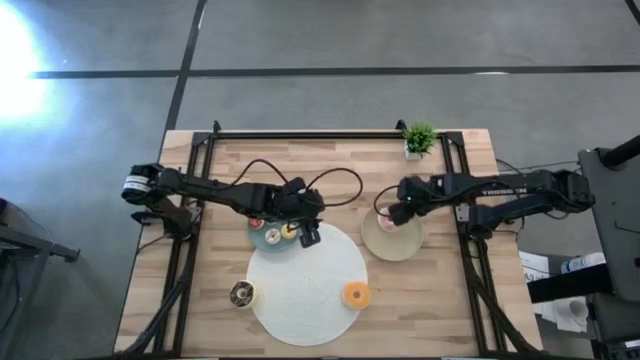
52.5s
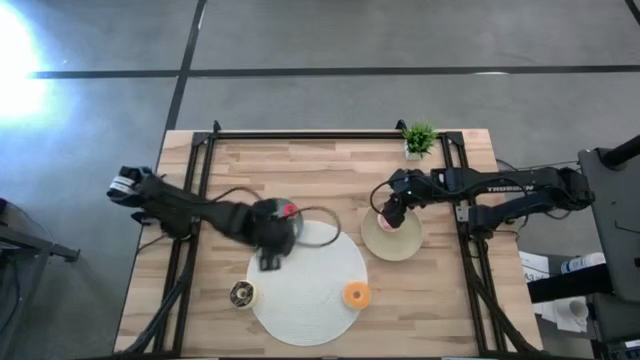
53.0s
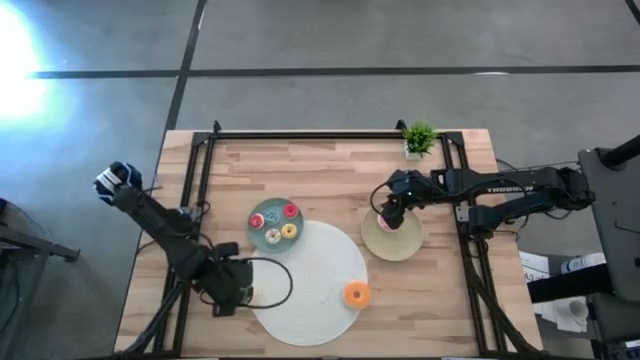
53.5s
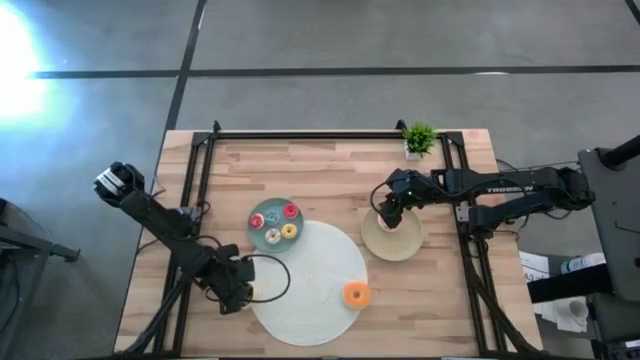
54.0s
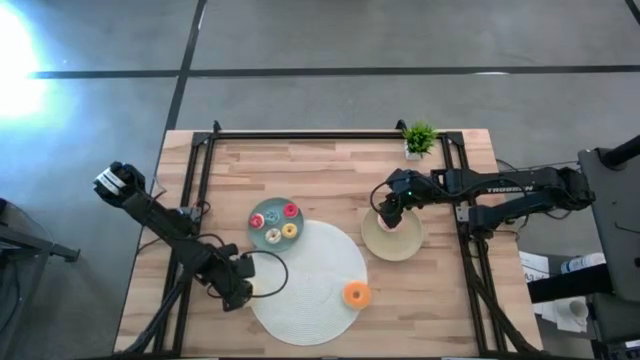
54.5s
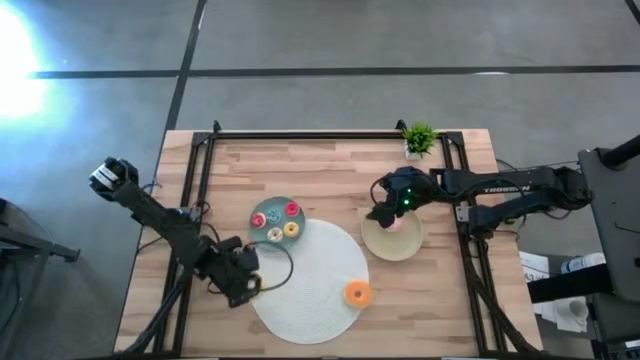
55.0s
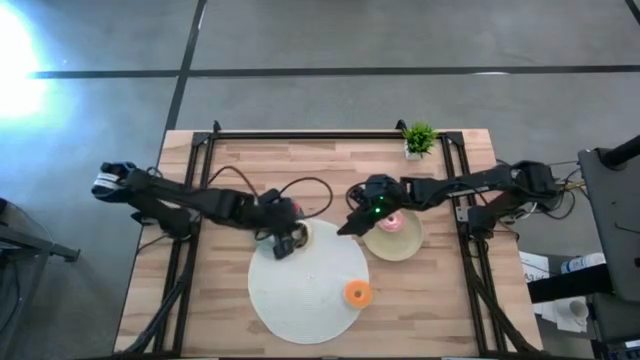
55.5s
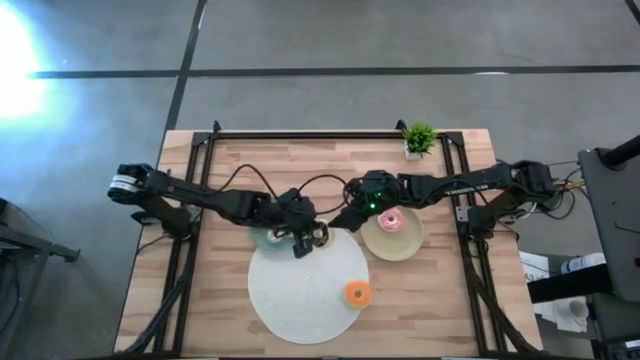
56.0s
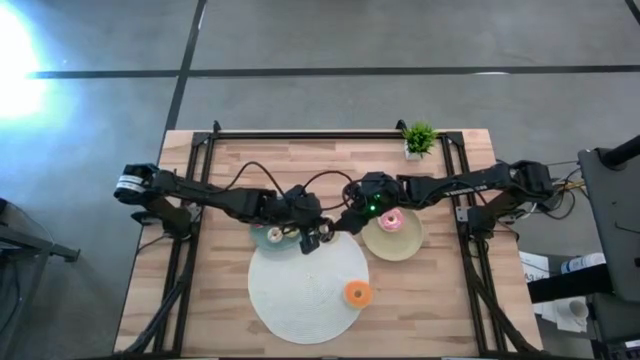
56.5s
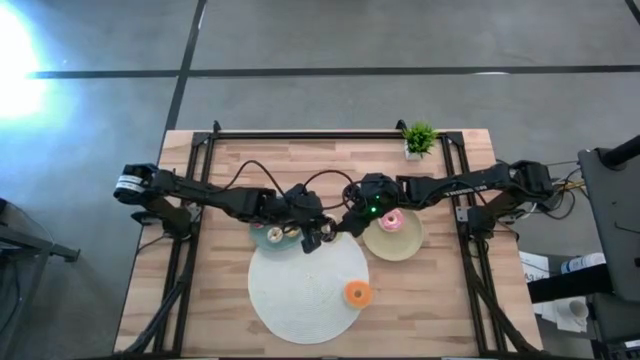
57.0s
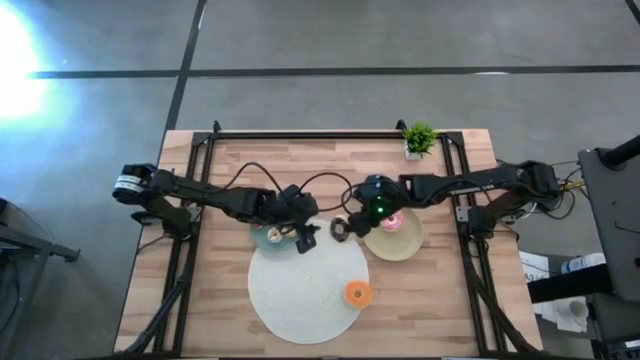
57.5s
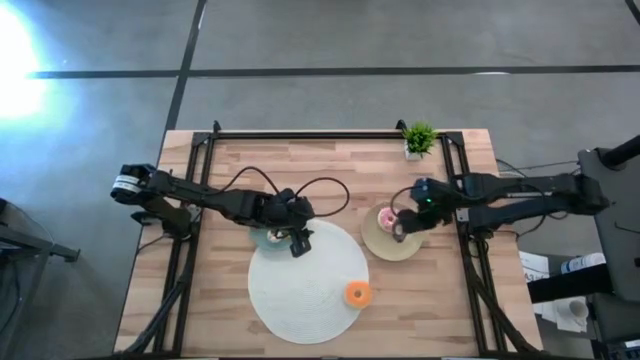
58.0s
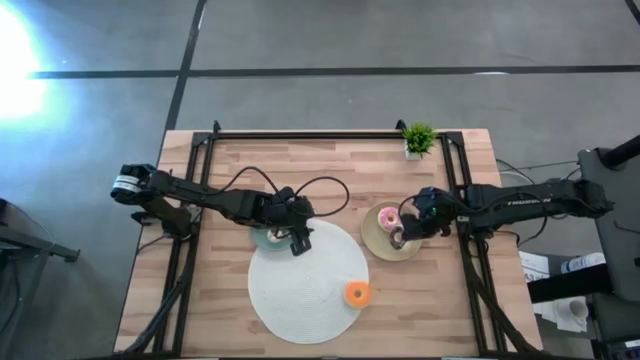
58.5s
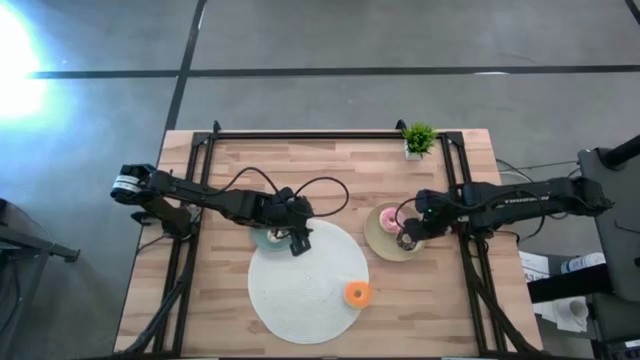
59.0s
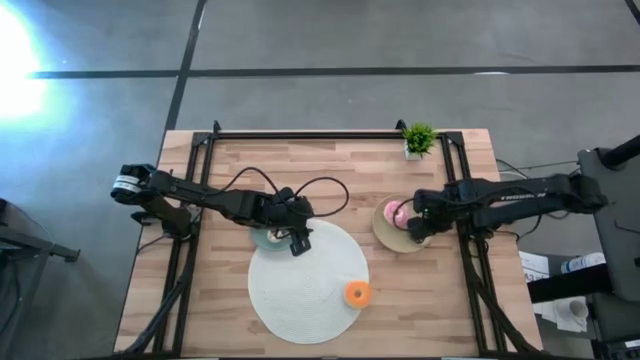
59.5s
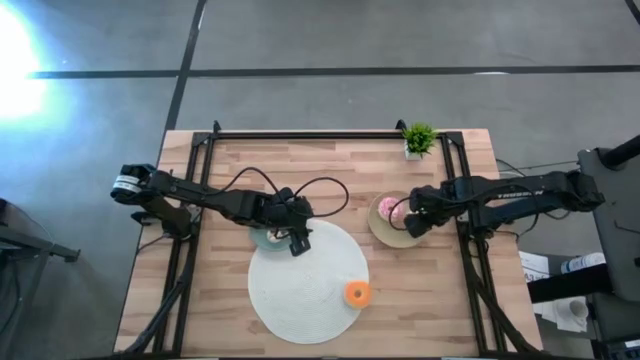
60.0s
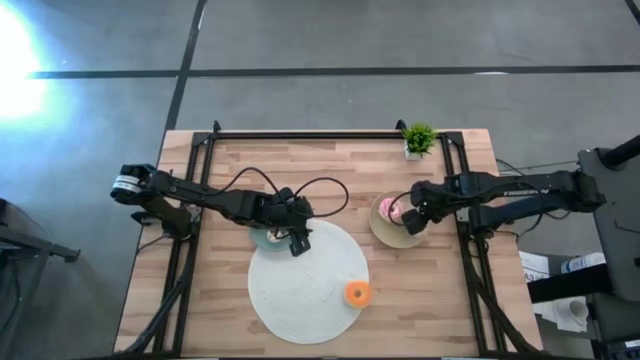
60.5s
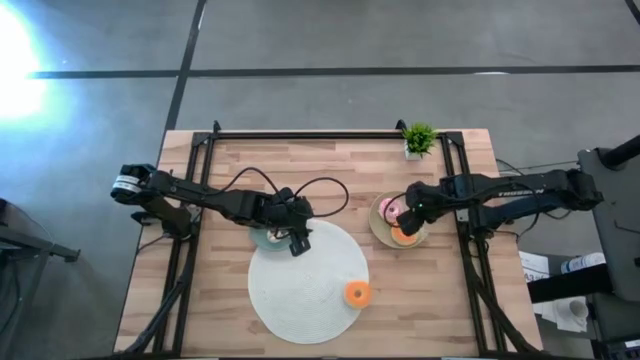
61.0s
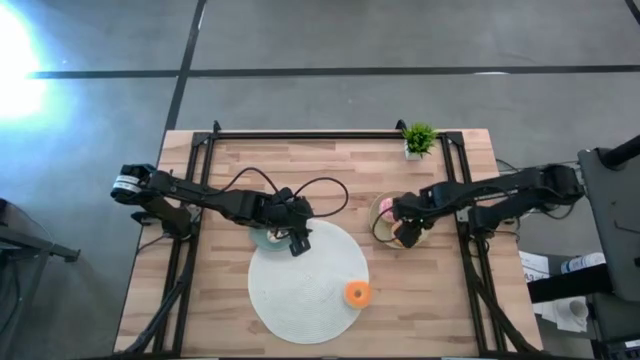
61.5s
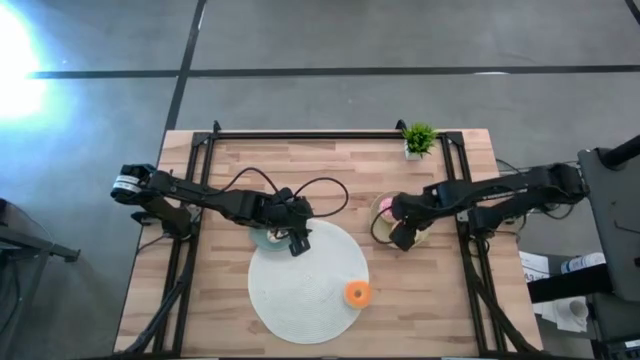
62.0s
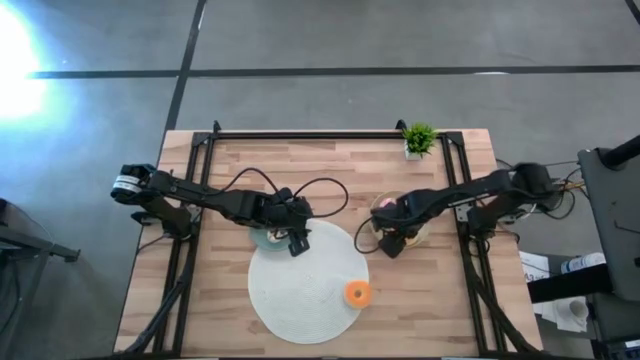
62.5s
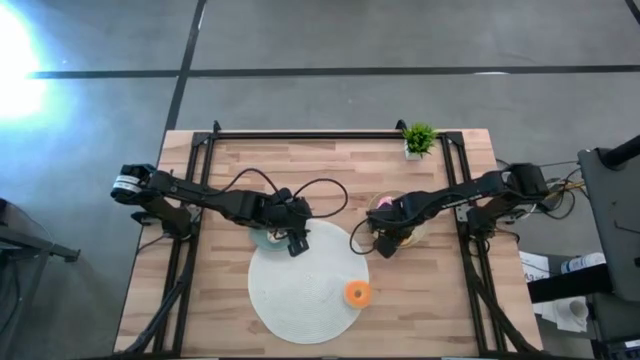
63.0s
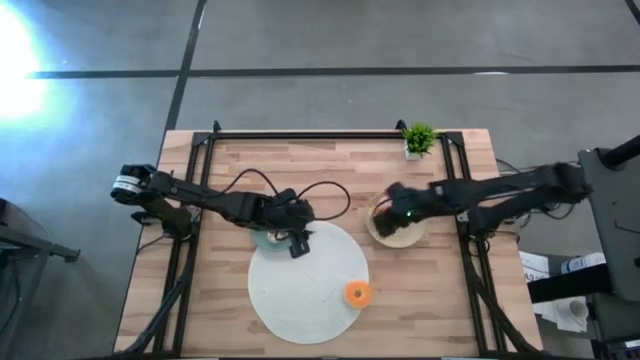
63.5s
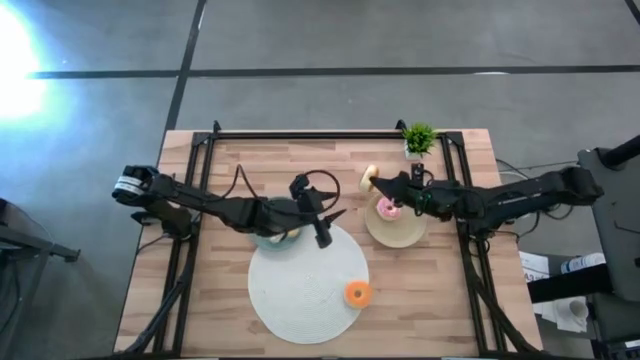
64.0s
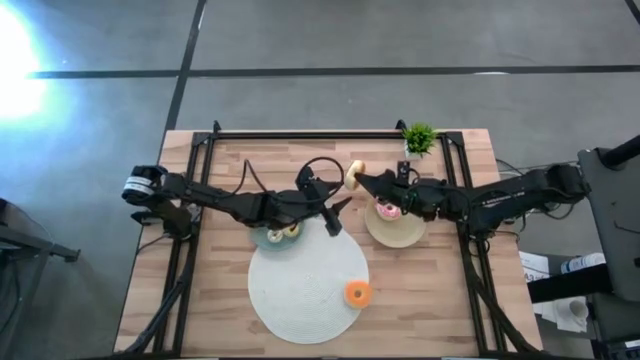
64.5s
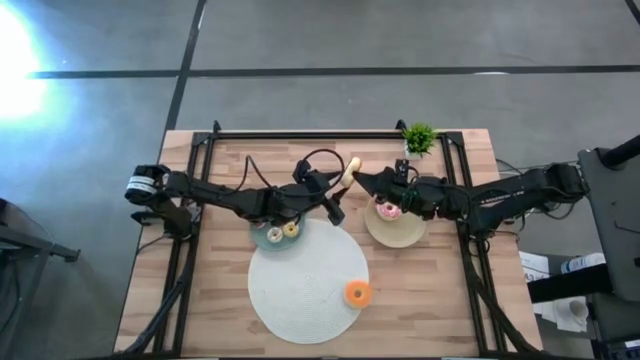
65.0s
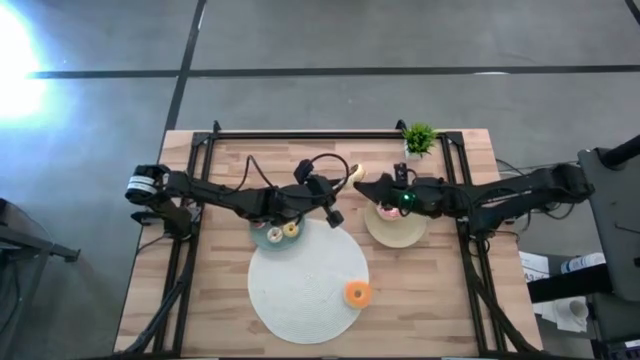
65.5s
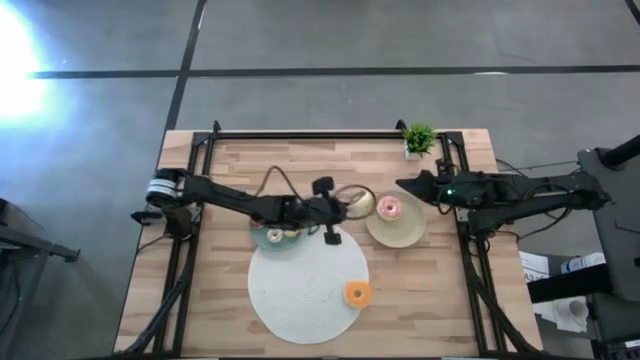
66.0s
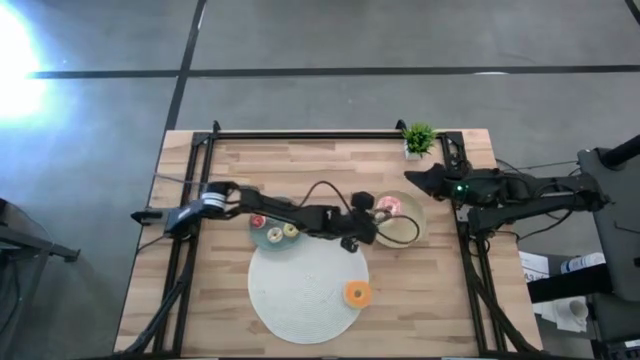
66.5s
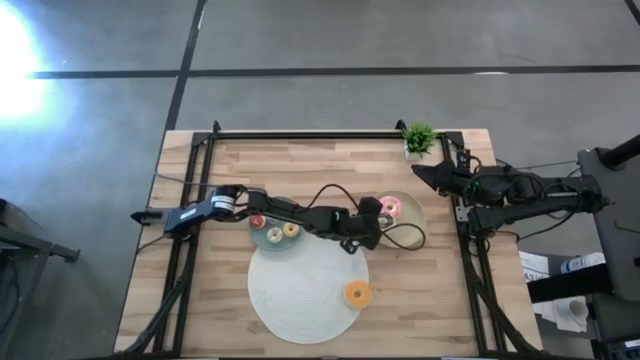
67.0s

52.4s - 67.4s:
Task: Pick & Place donuts
Put the big black donut on the brown plate

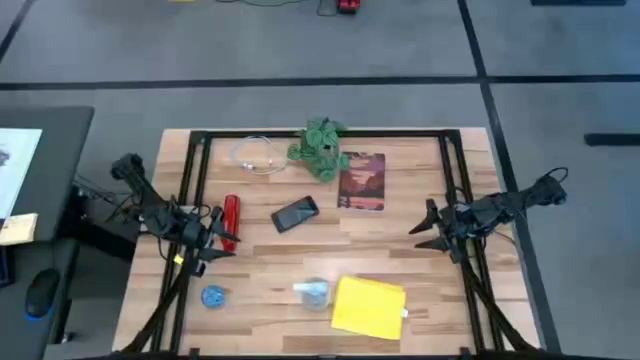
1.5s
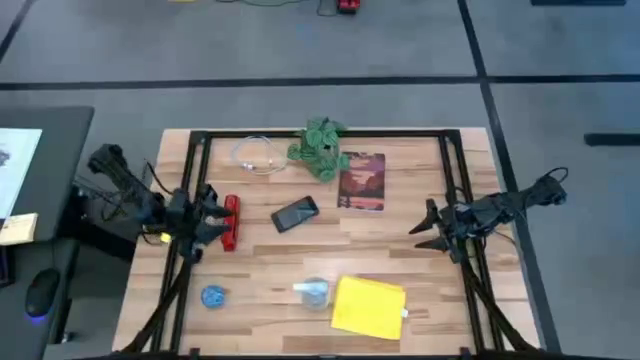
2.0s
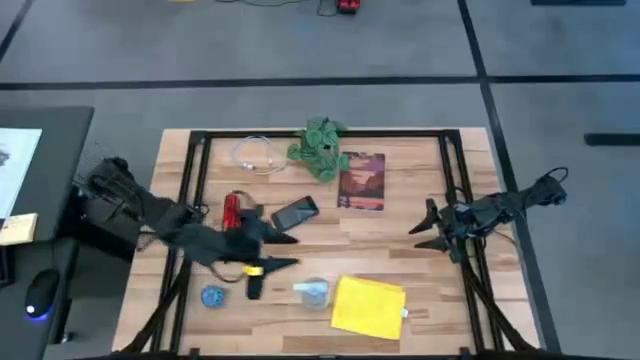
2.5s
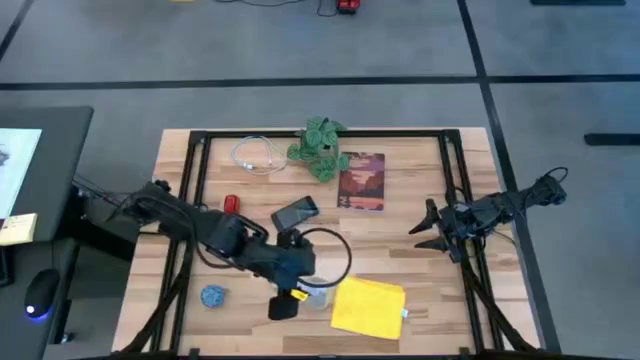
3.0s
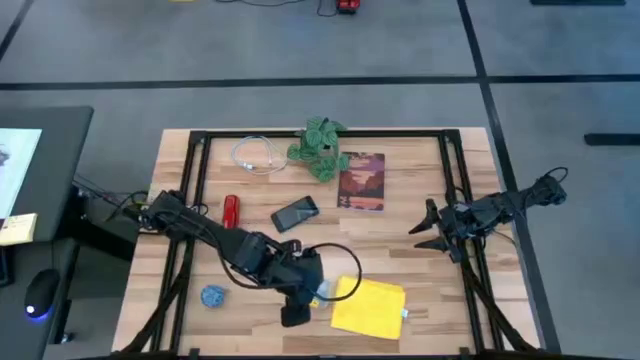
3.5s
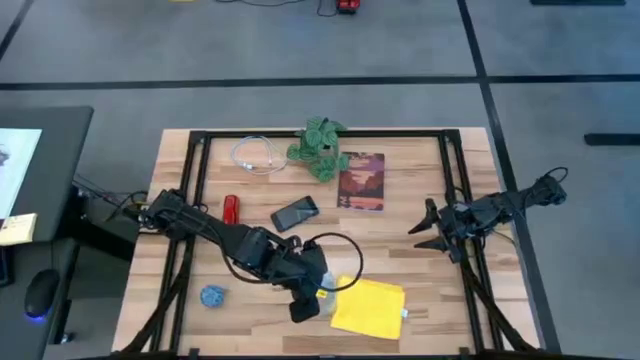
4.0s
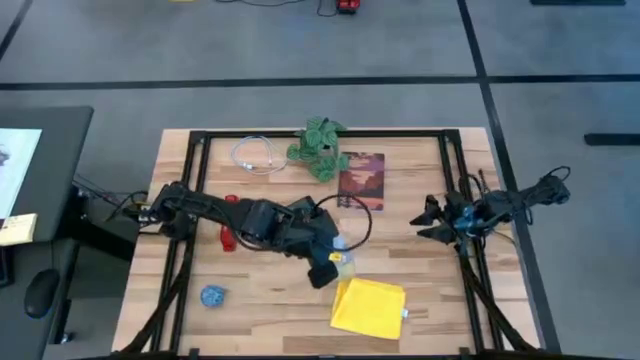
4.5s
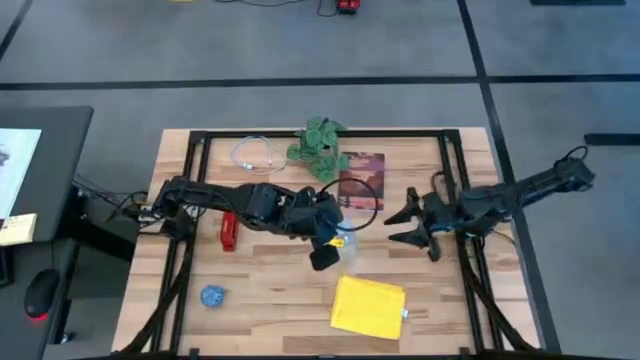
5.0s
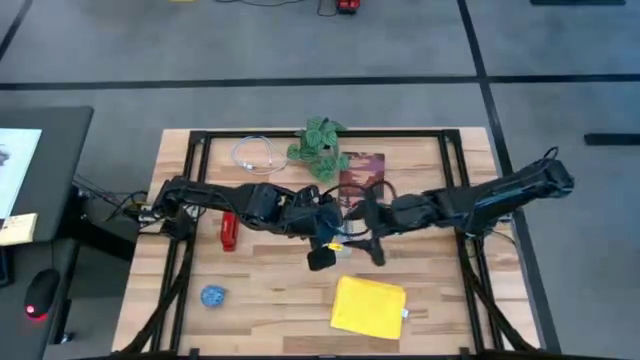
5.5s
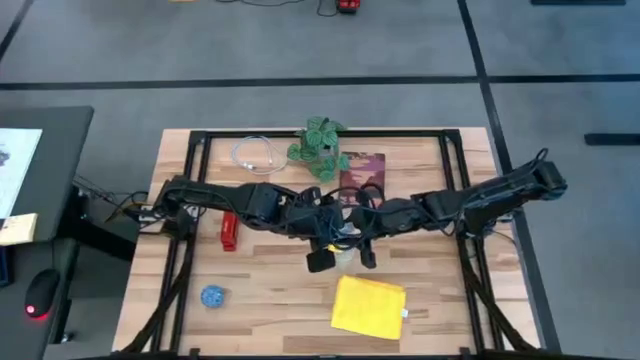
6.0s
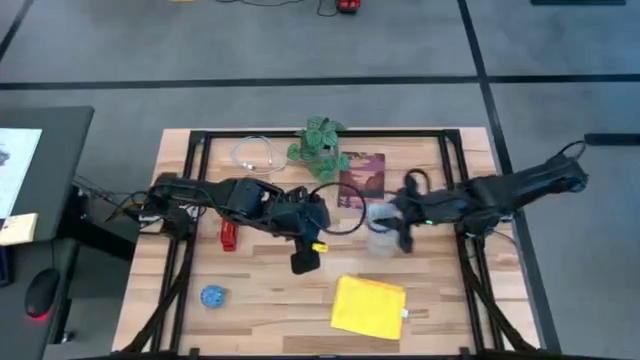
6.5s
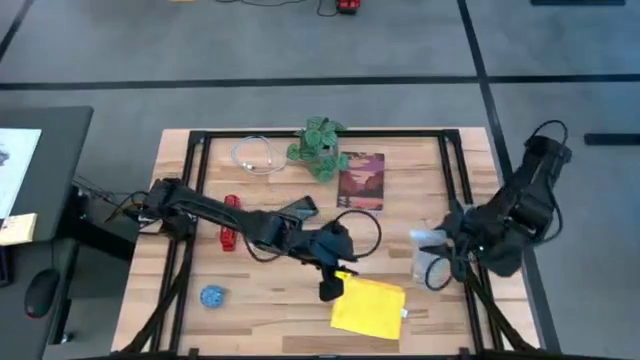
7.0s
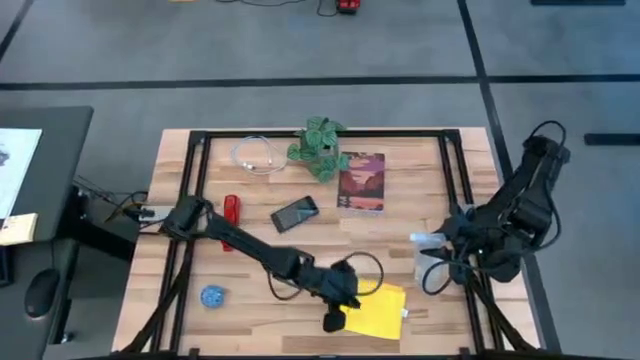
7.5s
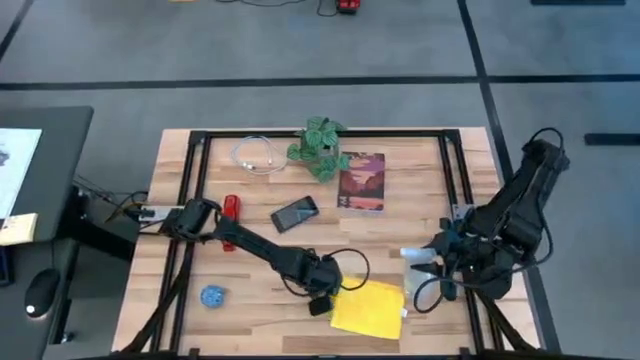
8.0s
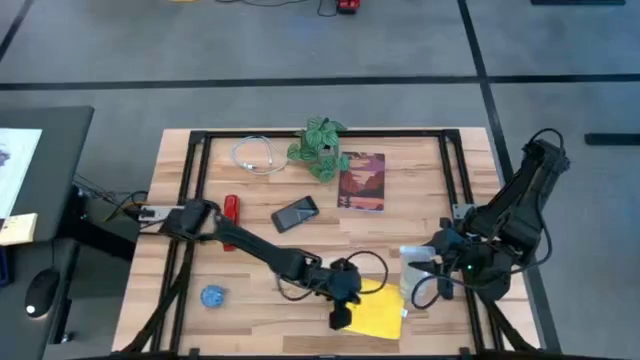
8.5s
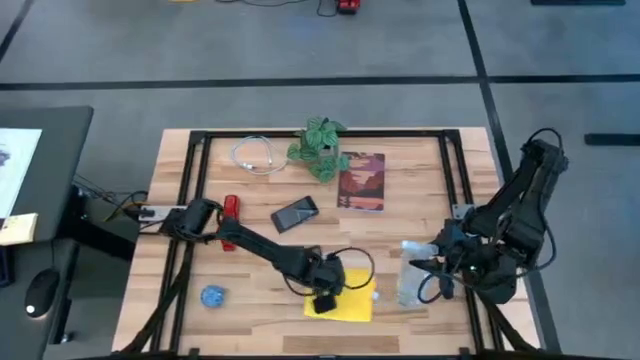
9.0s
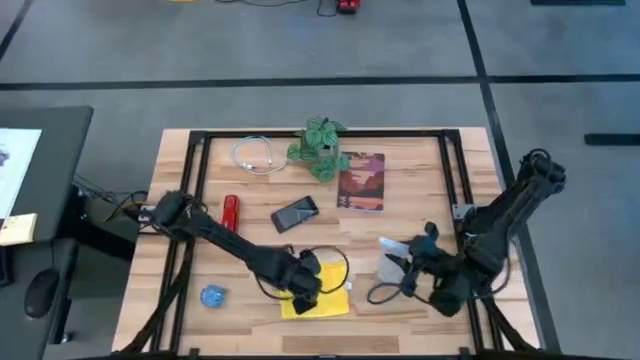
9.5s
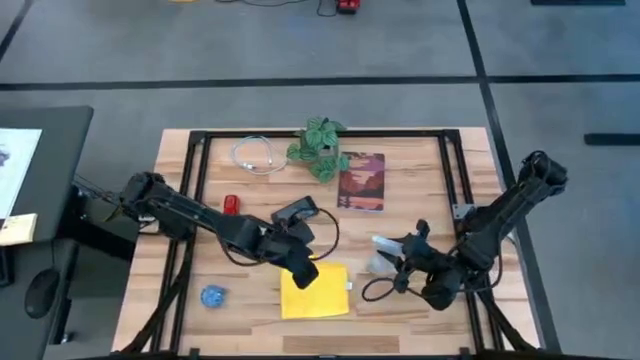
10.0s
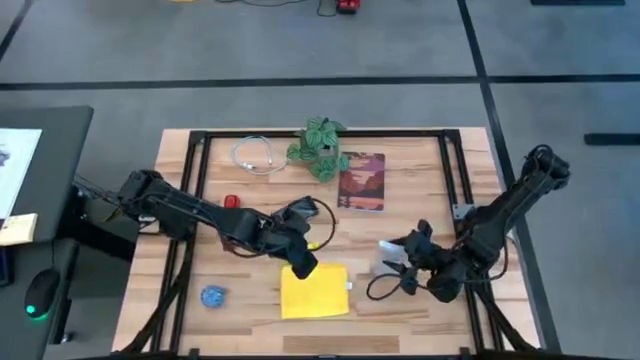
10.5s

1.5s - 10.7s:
Task: Apply microfiber cloth
Prepare the cleaning spray and the microfiber cloth
